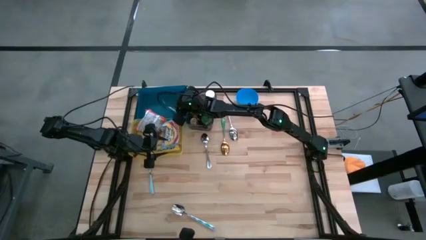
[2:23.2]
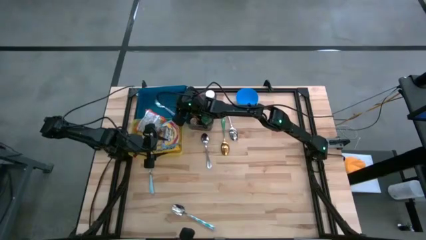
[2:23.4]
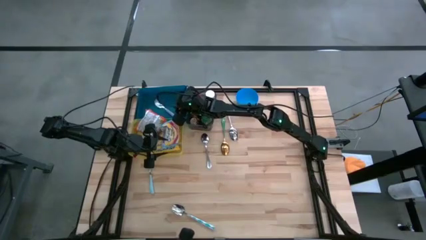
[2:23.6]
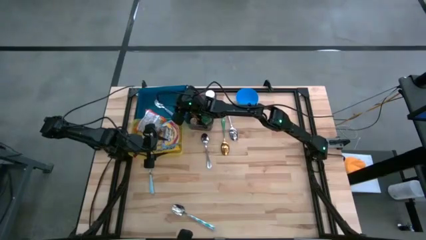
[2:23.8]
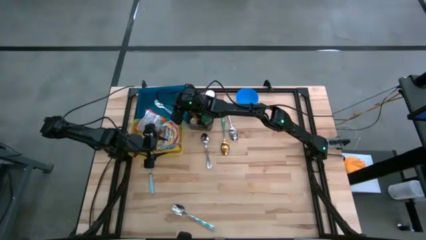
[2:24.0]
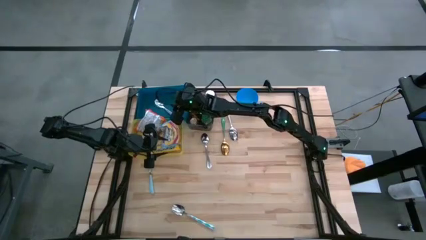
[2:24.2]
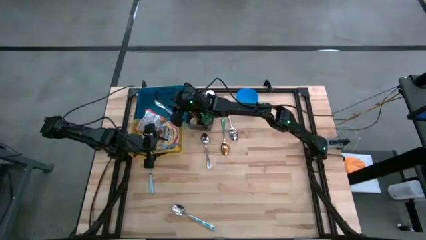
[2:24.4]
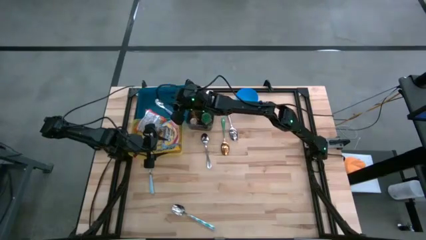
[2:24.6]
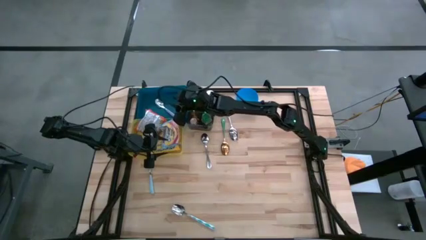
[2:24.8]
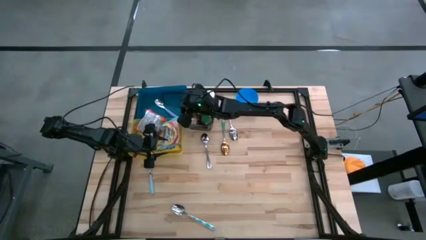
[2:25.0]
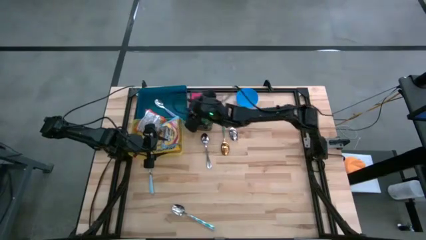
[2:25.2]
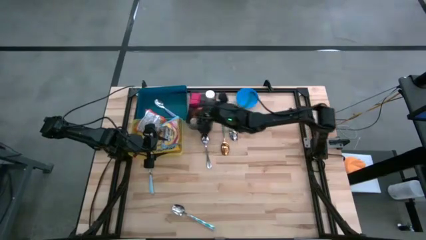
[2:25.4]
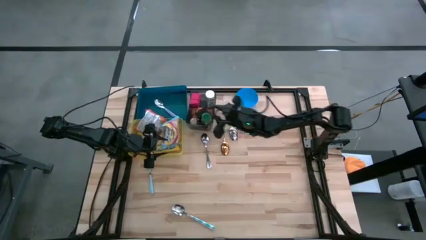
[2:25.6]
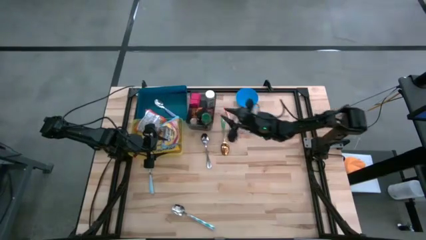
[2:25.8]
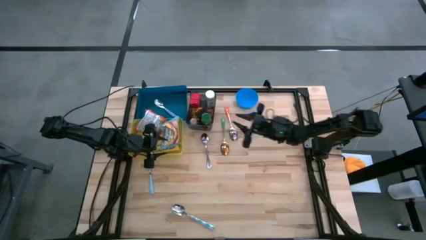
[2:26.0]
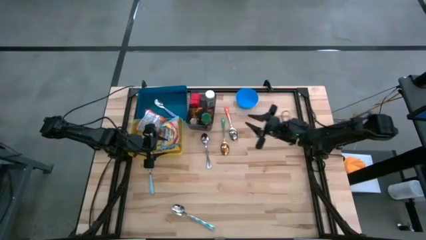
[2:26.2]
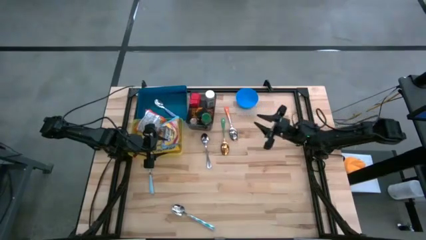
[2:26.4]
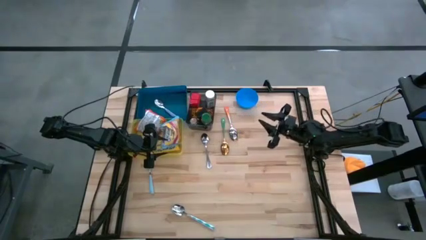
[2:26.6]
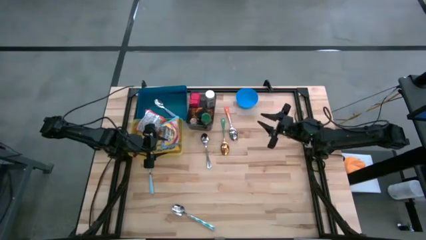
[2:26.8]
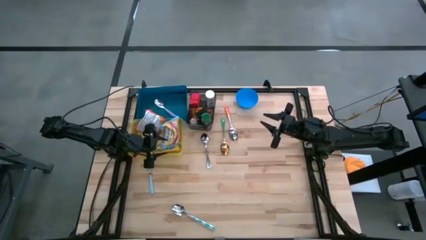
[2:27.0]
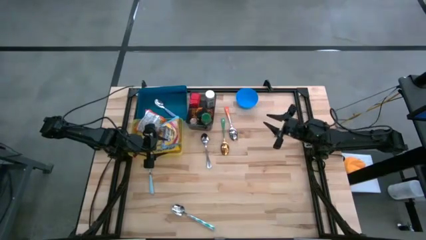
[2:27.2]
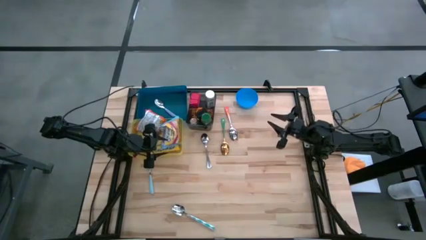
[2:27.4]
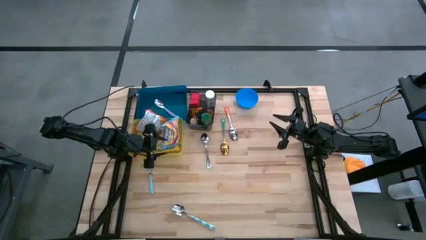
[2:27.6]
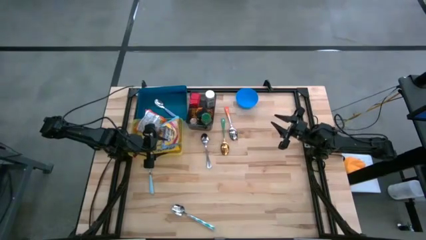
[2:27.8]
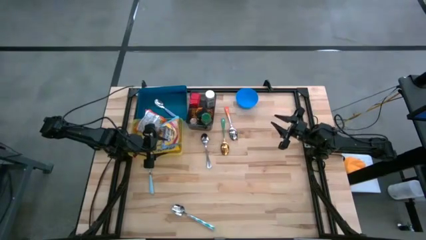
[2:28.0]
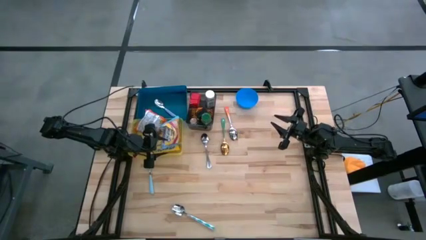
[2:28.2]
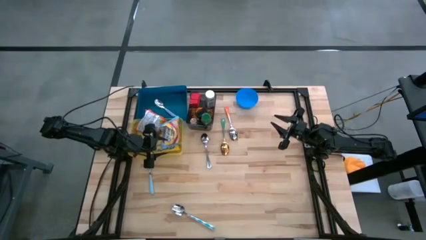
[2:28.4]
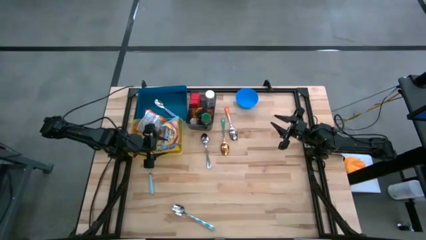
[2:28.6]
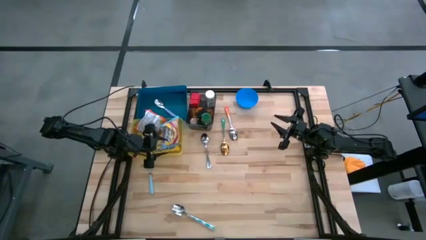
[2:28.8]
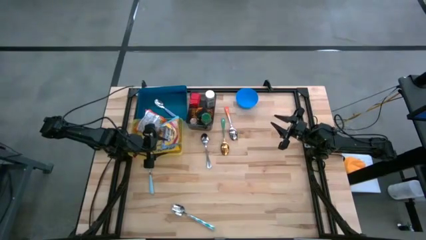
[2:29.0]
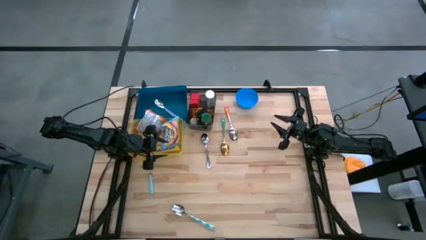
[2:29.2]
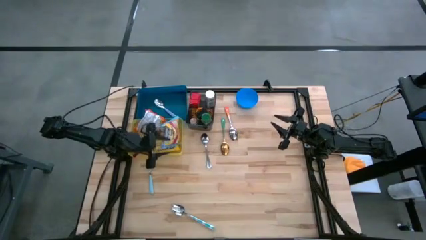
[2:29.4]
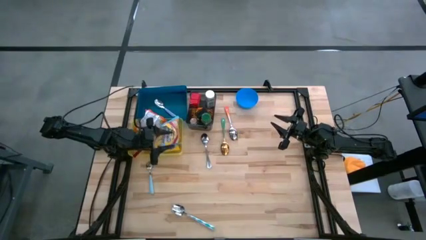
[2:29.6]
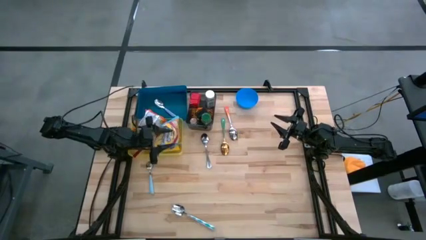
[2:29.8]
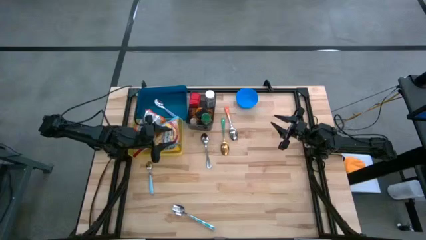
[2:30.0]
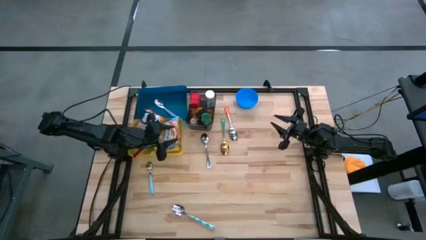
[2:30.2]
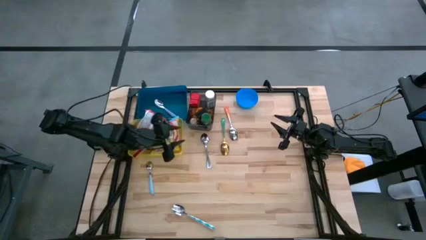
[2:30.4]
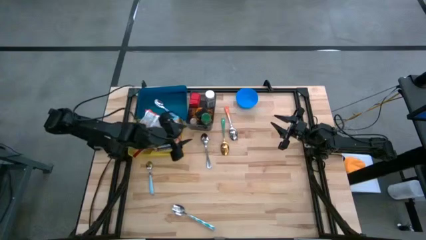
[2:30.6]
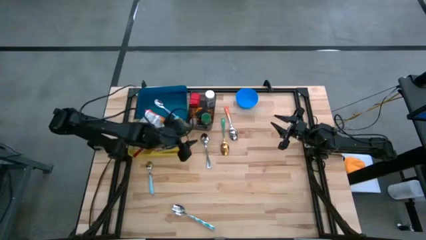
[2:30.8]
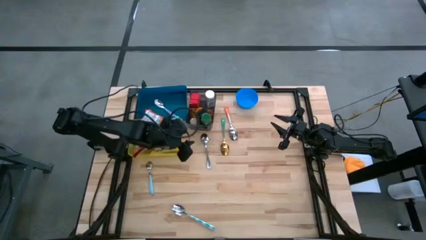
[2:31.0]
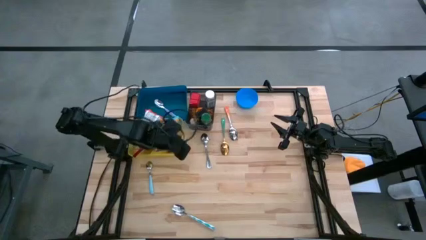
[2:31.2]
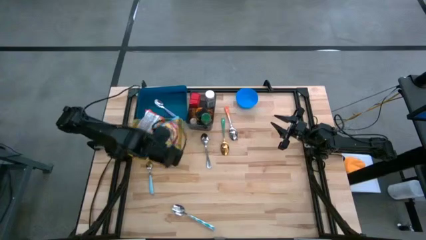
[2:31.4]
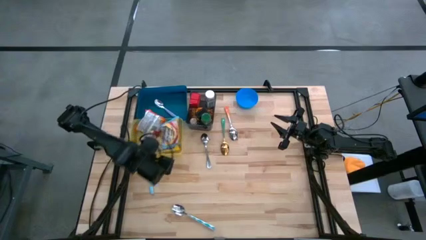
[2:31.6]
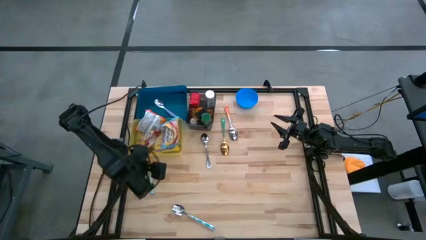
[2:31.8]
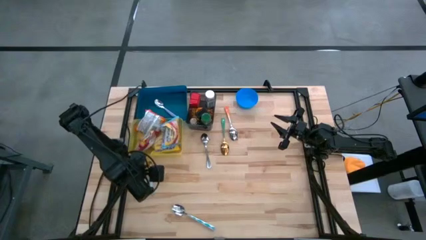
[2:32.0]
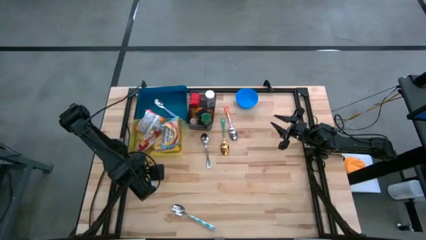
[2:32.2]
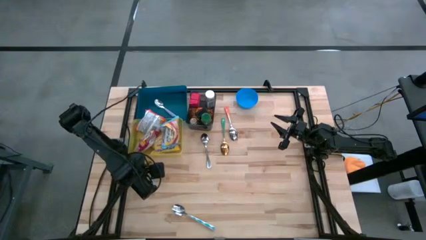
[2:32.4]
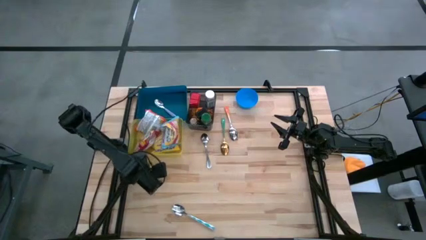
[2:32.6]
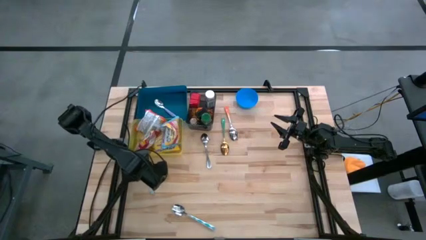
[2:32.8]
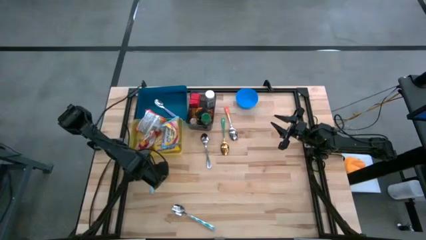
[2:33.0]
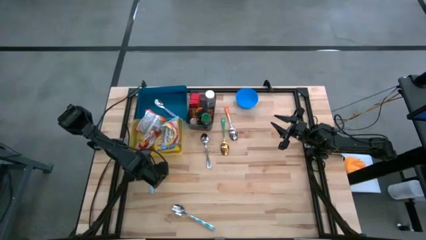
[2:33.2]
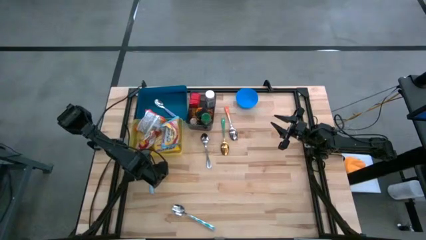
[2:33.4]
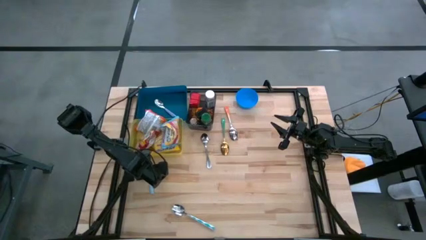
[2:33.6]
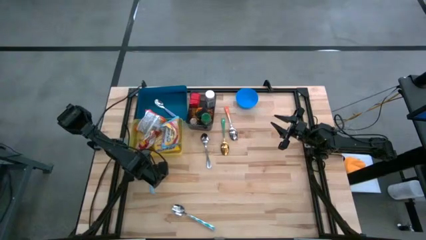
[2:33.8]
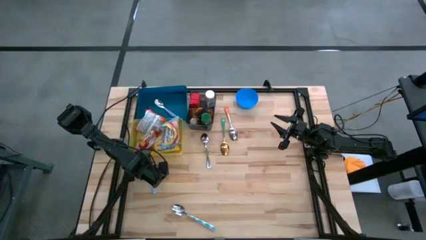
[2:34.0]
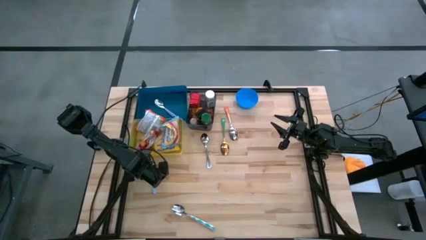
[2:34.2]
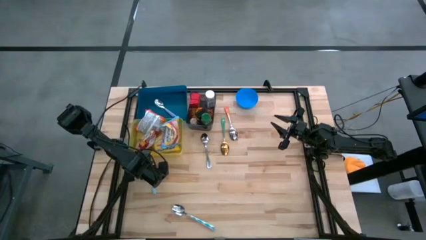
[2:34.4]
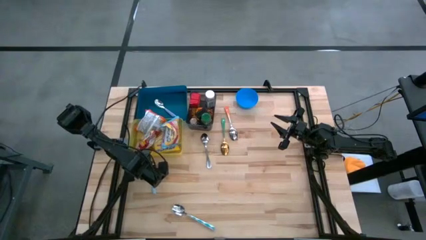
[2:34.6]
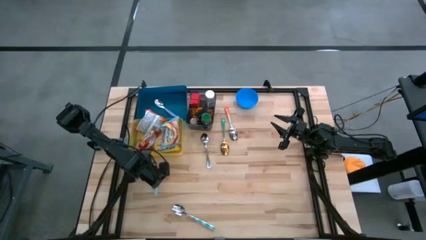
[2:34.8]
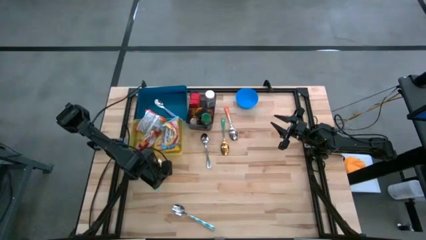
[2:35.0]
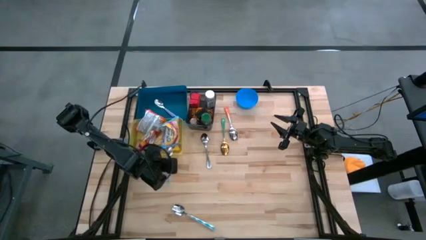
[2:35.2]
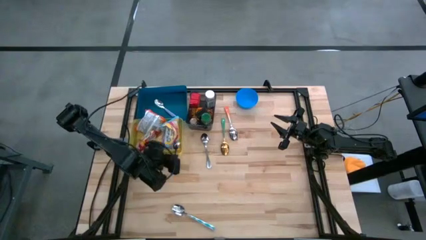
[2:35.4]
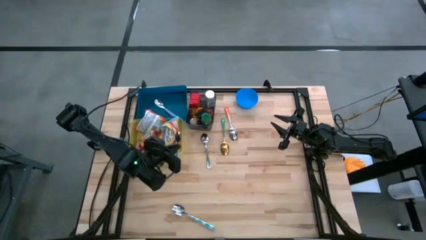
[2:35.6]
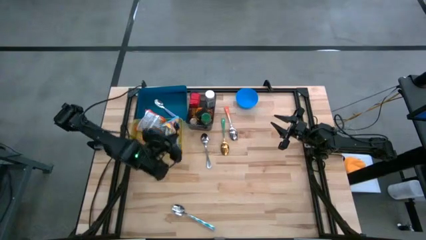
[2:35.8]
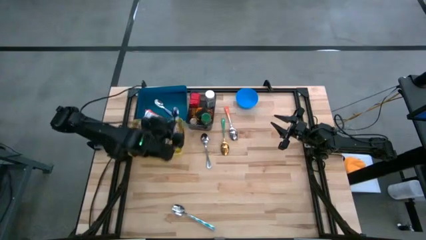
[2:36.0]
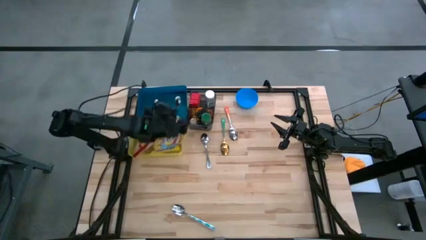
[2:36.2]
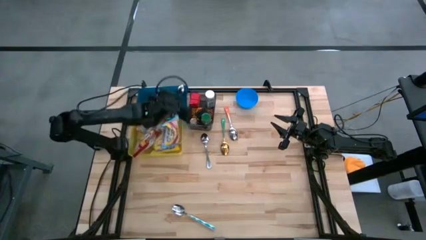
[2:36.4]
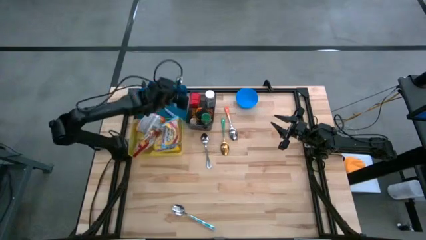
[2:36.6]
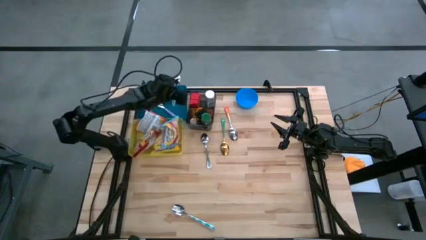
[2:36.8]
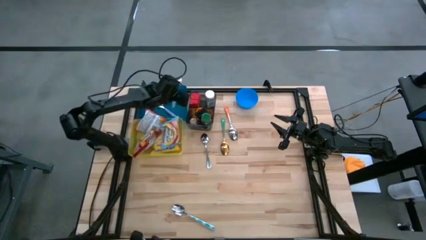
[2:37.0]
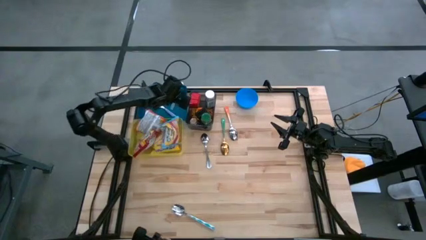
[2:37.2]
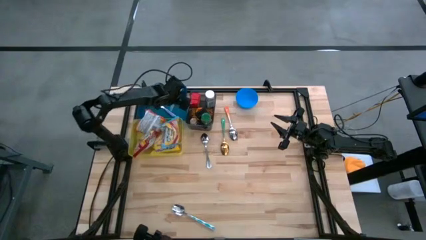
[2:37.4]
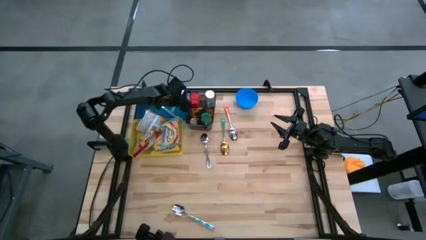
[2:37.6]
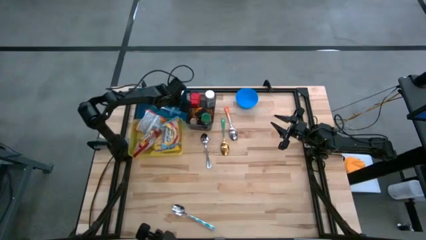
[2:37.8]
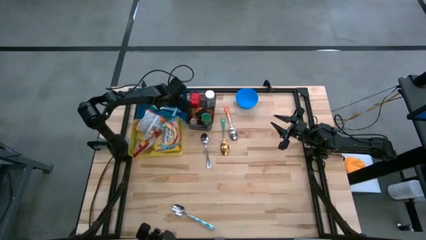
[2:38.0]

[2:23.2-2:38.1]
Put the blue spoon into the blue bin
